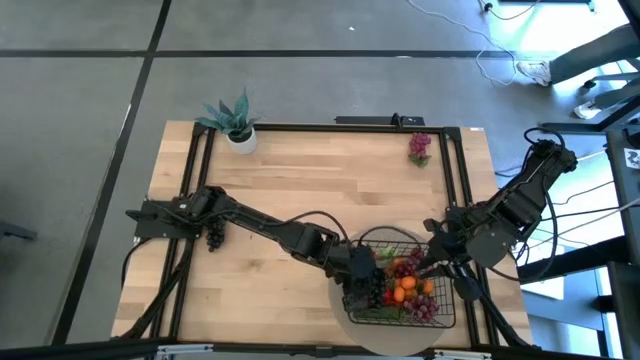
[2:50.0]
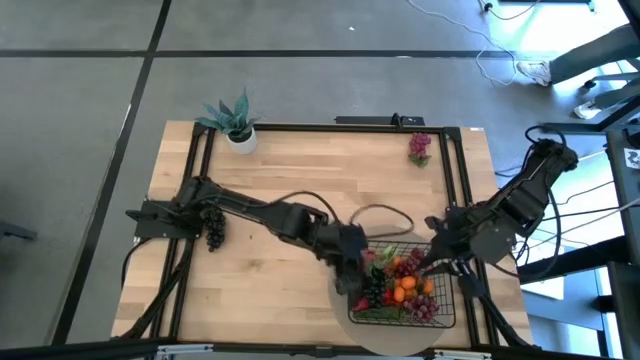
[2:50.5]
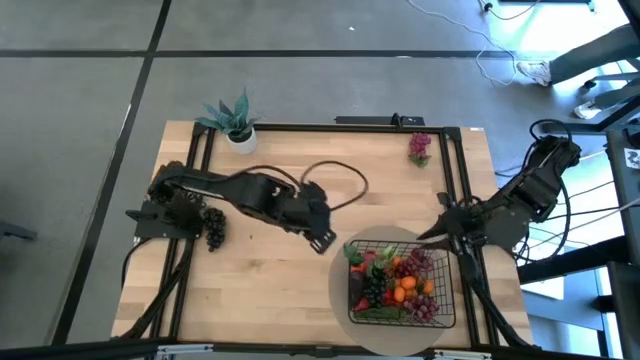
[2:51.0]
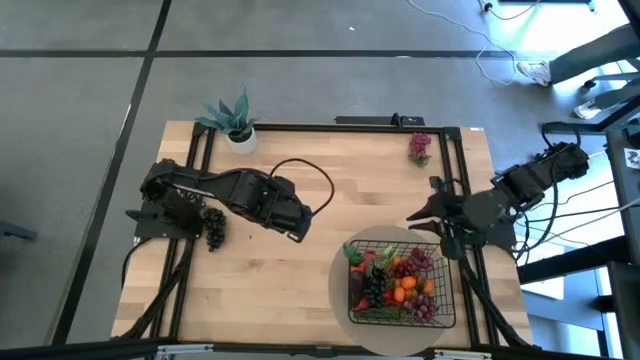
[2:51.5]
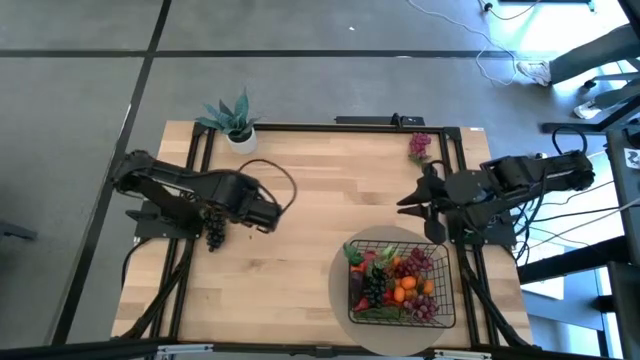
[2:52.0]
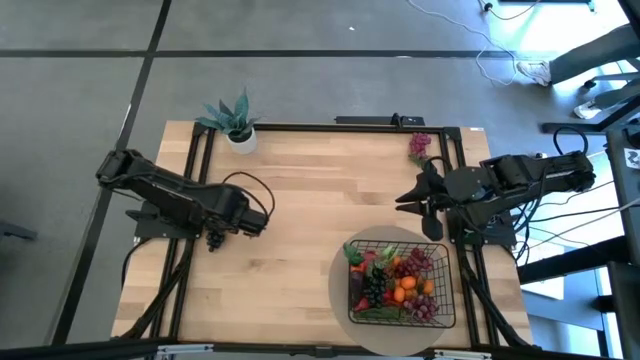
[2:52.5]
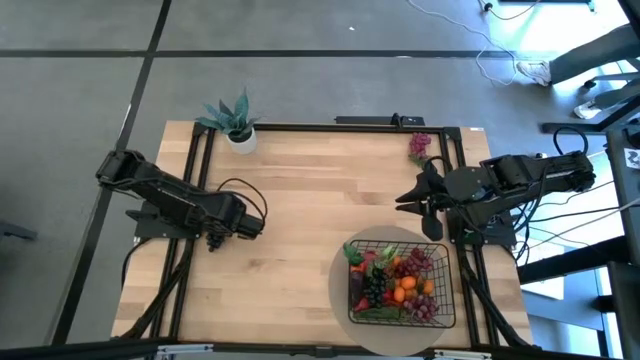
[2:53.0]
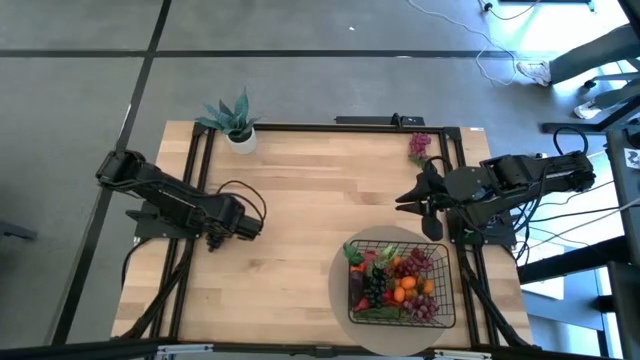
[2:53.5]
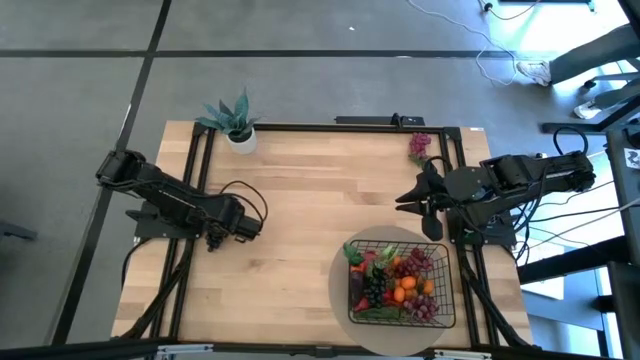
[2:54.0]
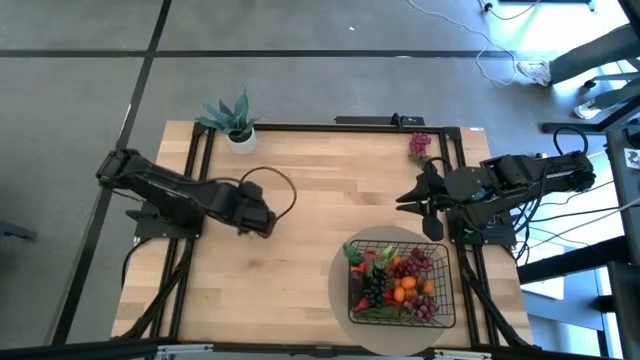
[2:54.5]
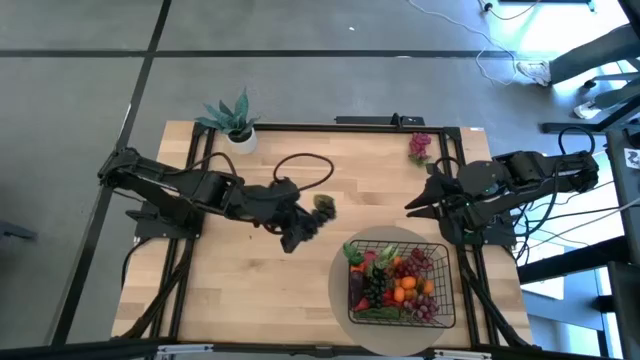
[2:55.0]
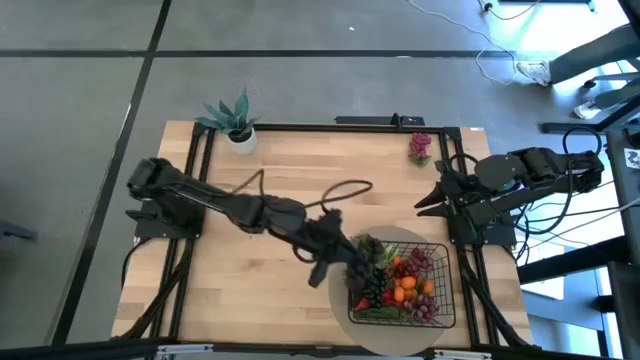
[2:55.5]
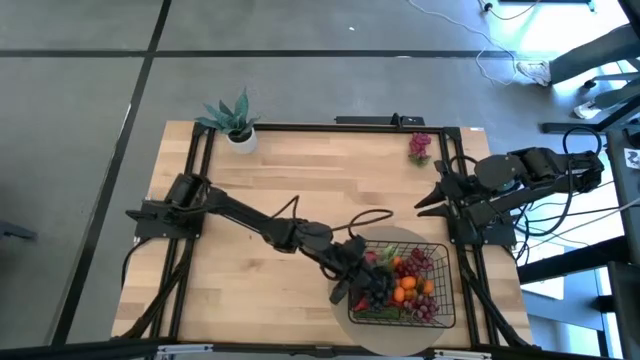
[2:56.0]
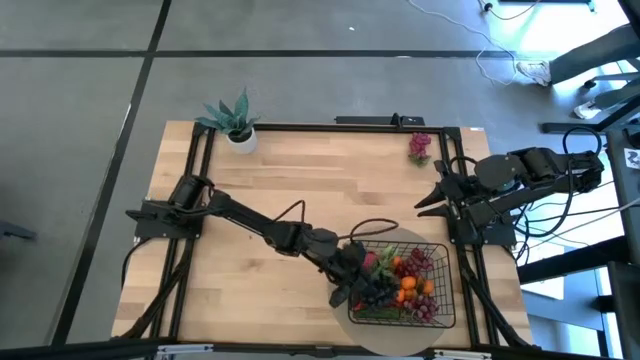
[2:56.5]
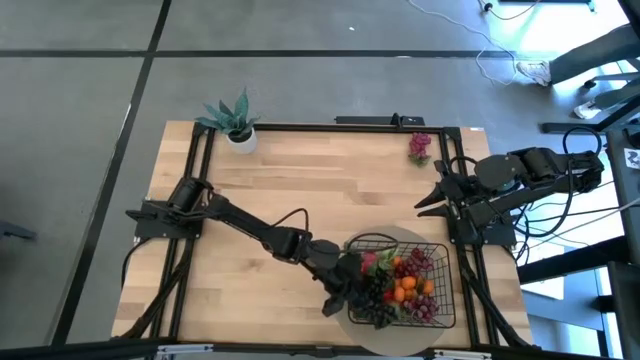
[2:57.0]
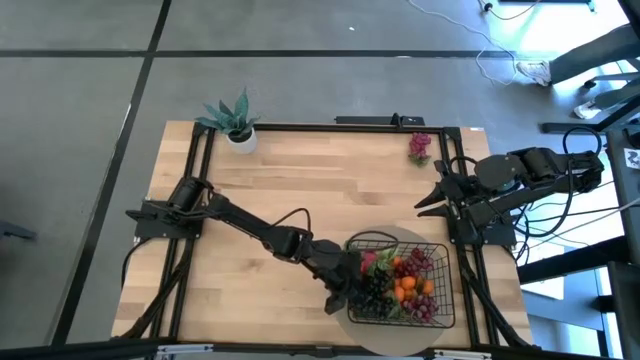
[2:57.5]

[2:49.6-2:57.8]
Task: Build produce basket
Put the black grapes into the black wire basket

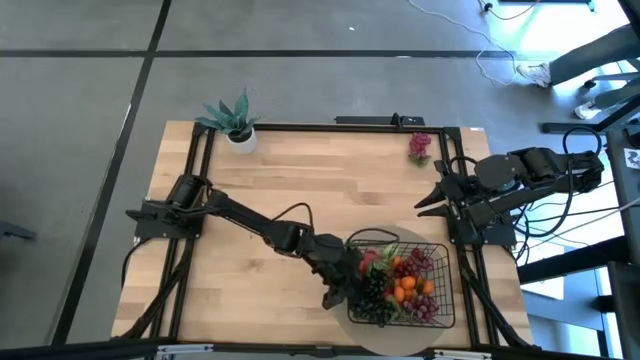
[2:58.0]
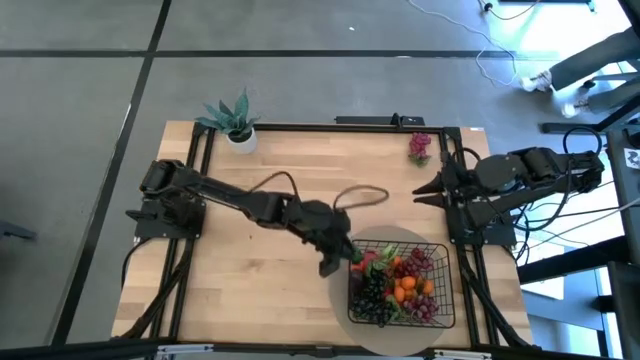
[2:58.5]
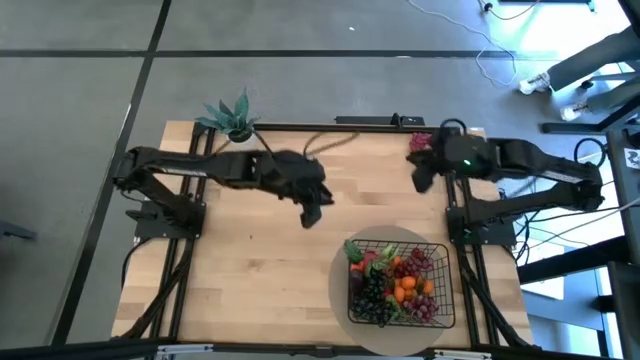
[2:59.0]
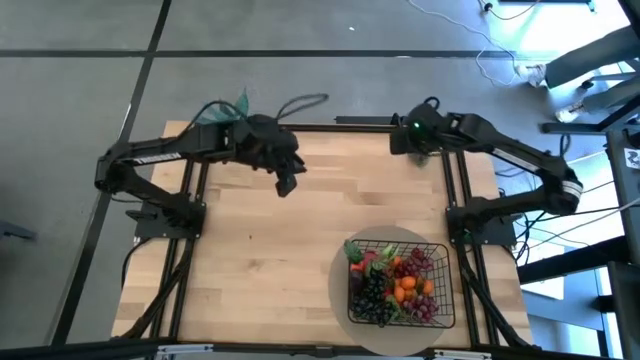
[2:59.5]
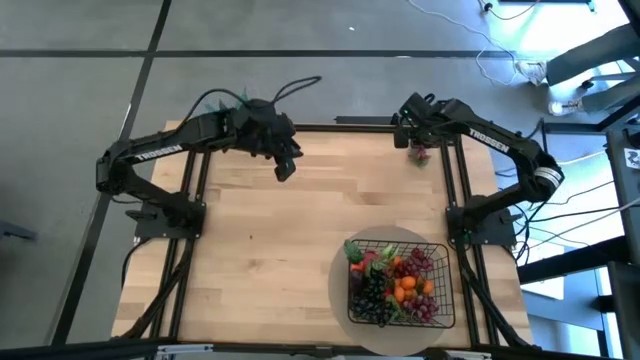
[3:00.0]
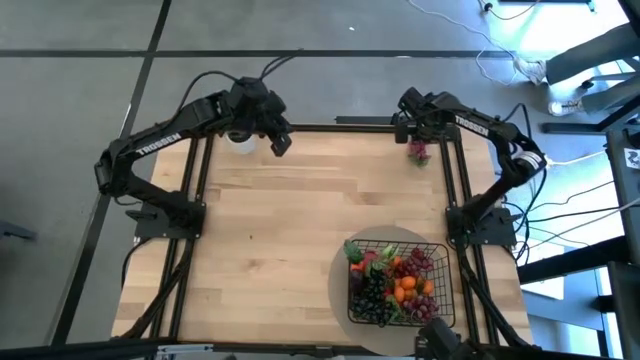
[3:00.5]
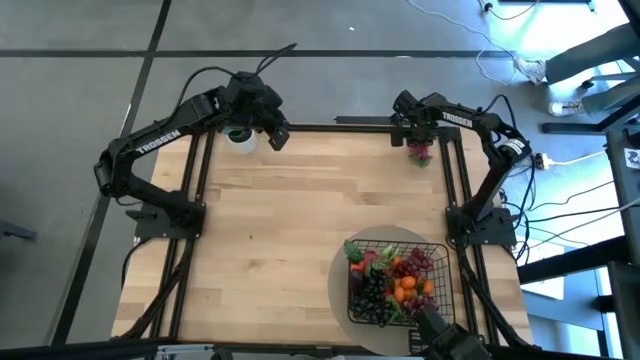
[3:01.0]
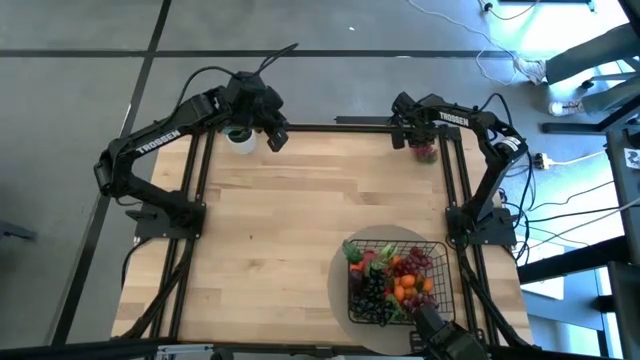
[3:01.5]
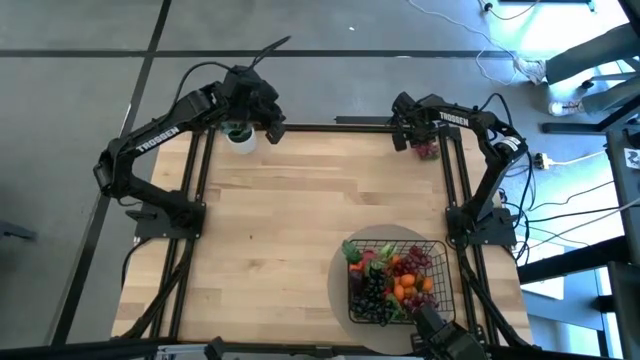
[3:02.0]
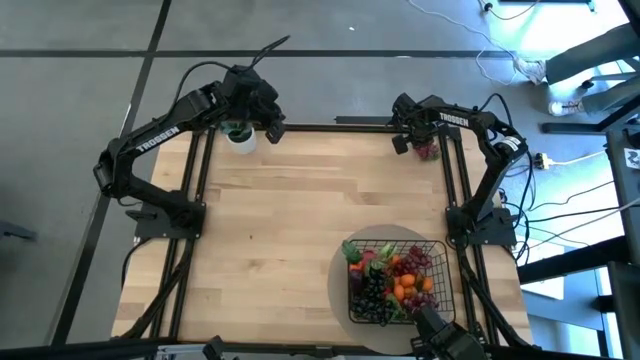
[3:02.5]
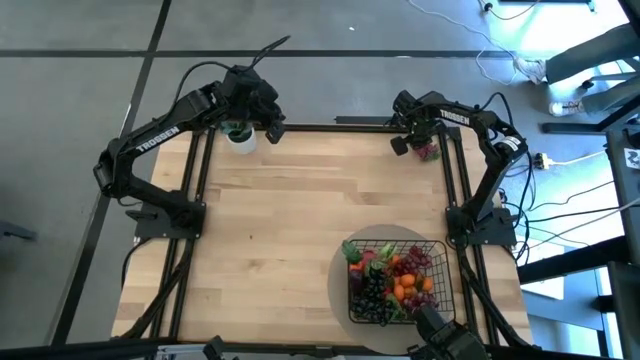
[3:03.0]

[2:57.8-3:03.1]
Put the red grapes into the black wire basket

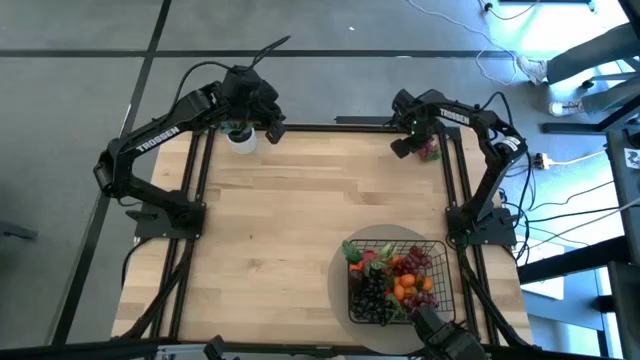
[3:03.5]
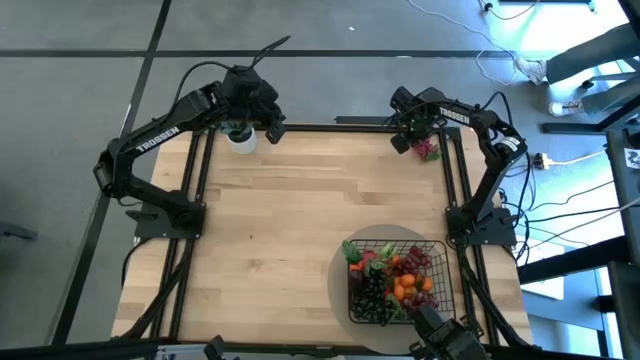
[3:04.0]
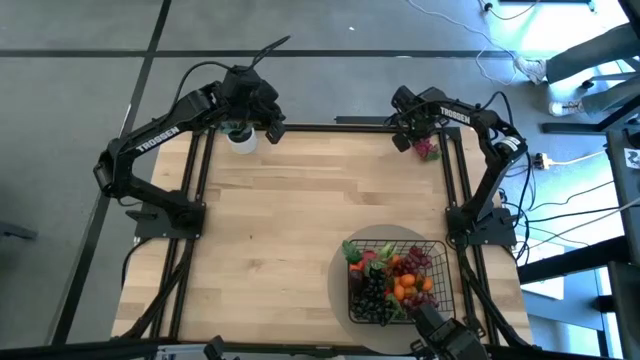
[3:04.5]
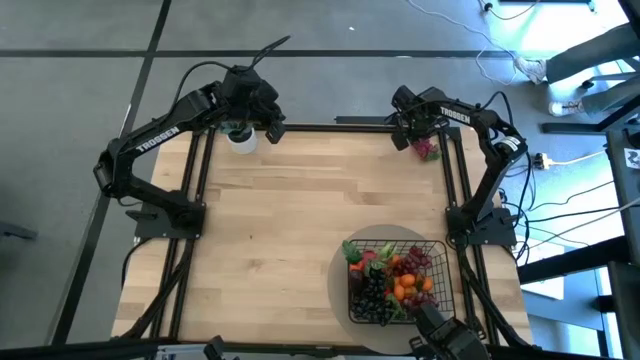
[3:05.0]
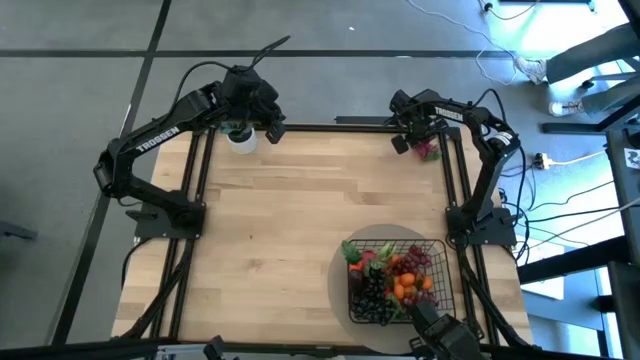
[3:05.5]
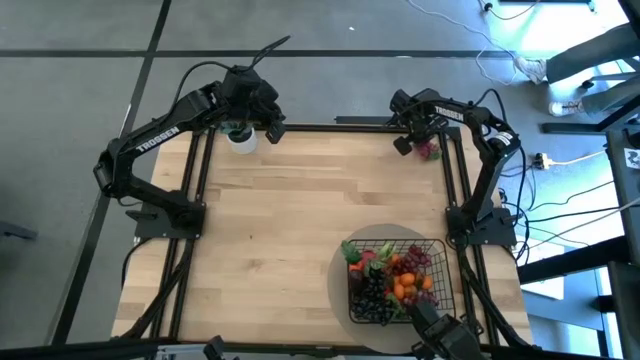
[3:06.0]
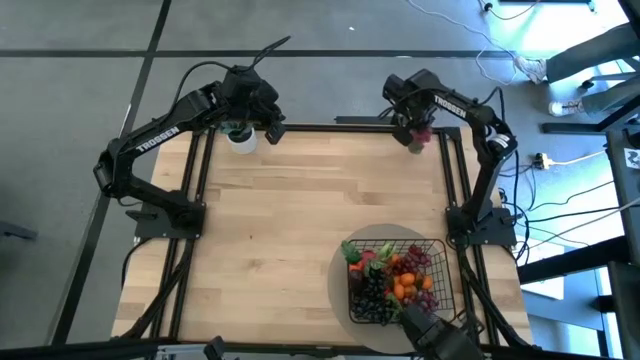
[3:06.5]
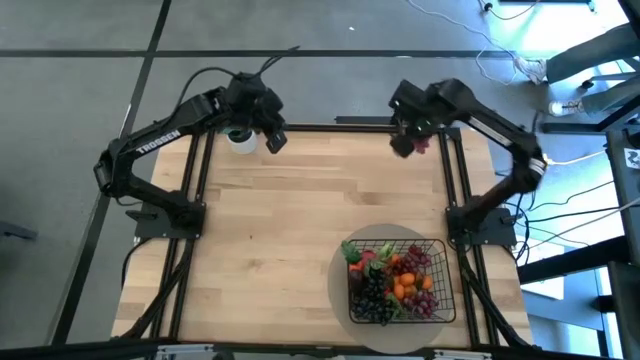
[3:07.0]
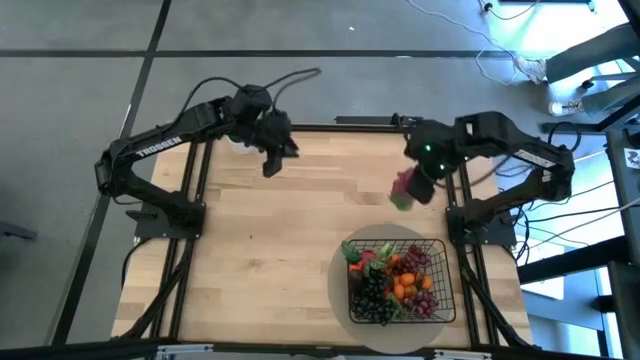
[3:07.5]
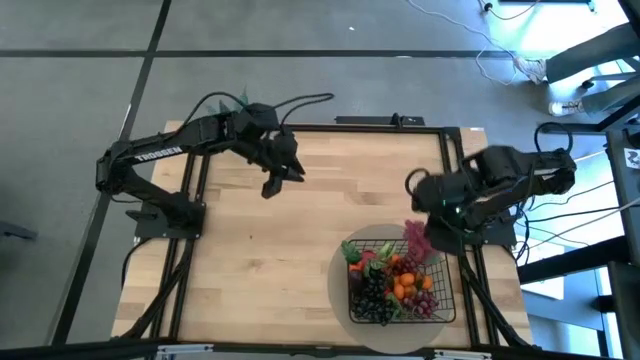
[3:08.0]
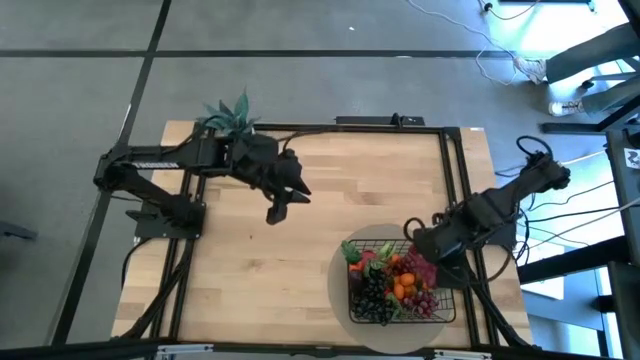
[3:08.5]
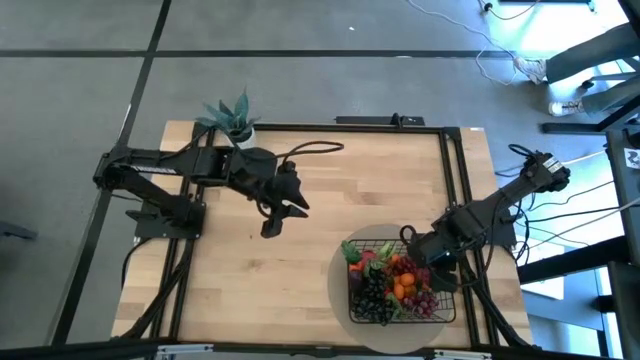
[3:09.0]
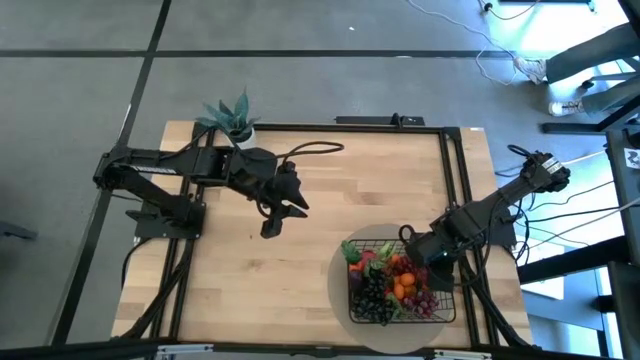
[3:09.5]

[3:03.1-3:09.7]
Put the red grapes into the black wire basket

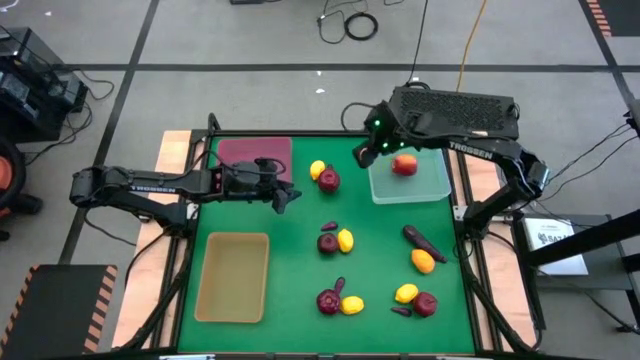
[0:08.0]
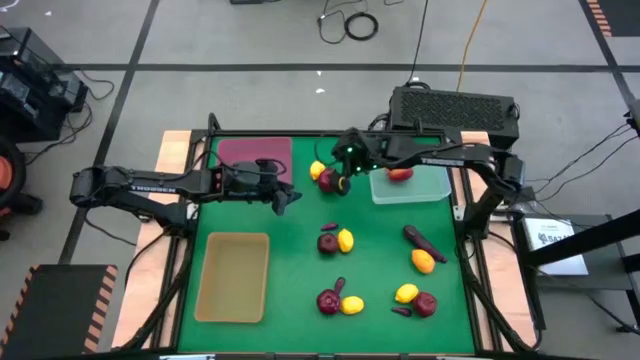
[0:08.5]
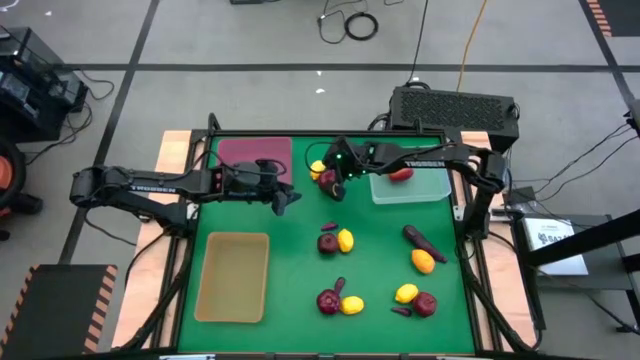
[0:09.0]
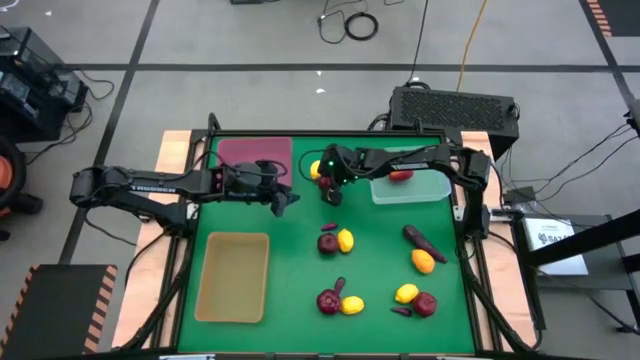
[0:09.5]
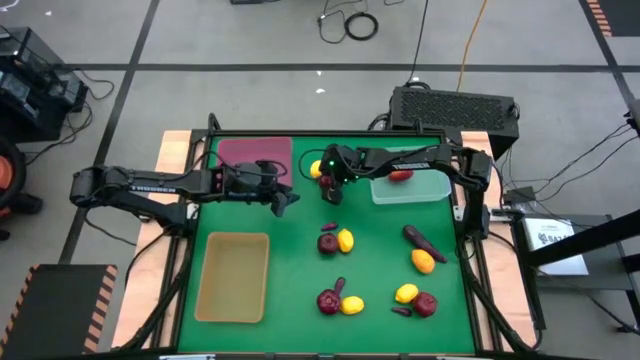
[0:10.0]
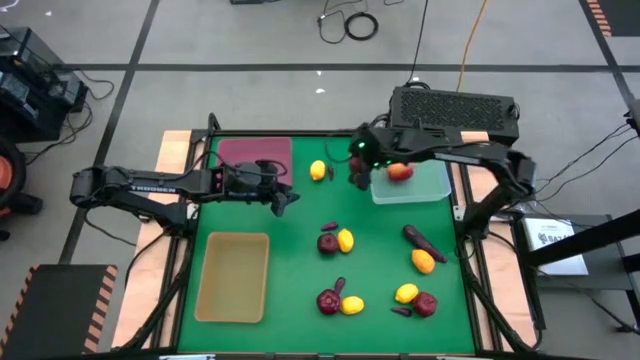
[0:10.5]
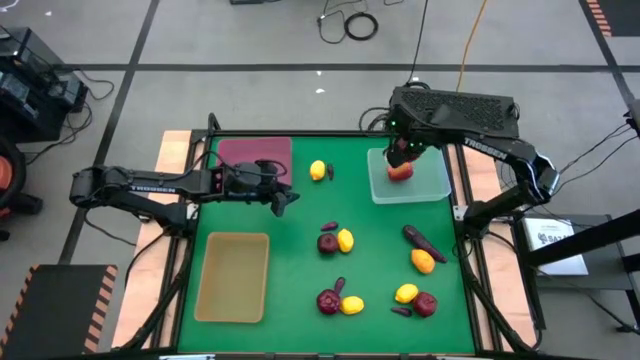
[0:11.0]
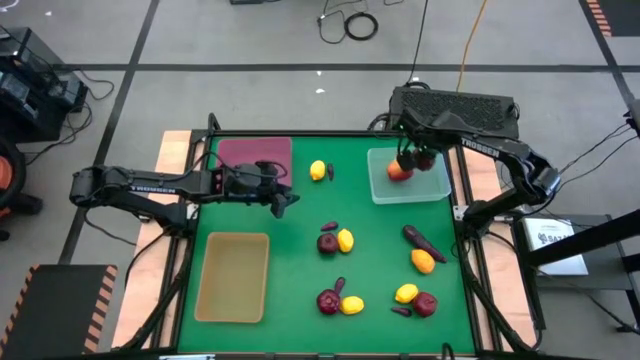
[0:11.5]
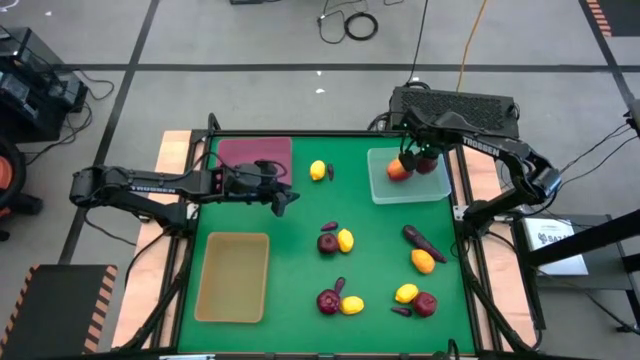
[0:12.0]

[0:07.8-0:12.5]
Task: Sort produce into baskets
Put the apple into the transparent bin
